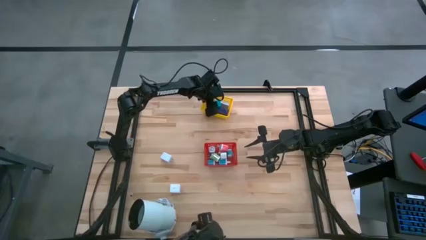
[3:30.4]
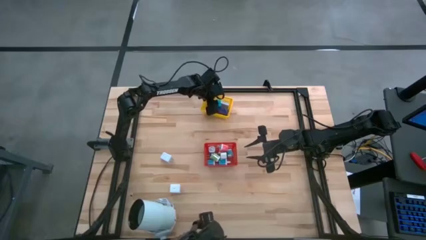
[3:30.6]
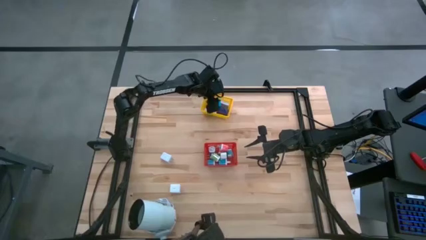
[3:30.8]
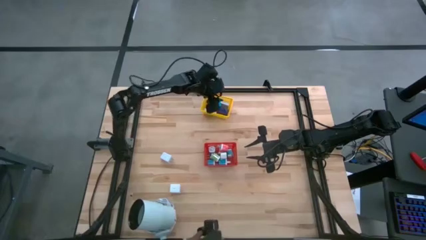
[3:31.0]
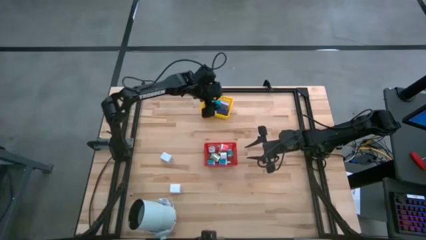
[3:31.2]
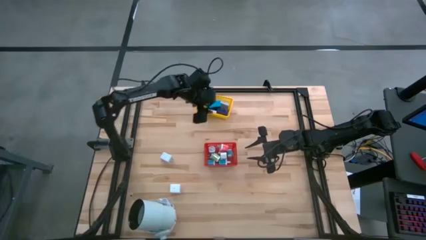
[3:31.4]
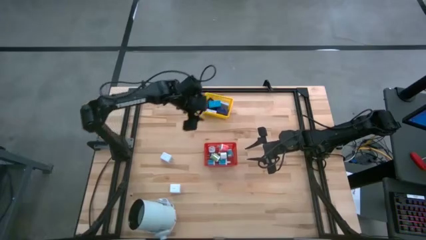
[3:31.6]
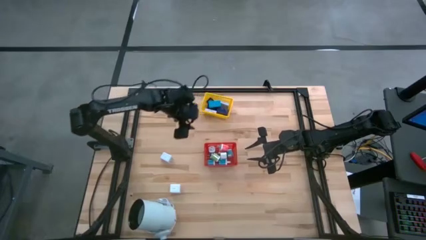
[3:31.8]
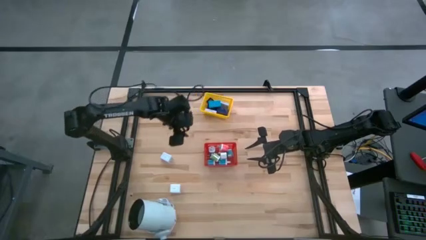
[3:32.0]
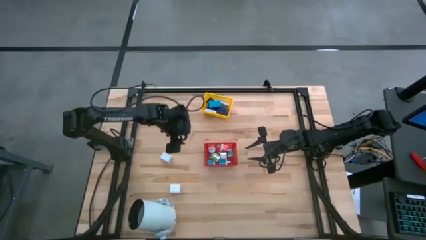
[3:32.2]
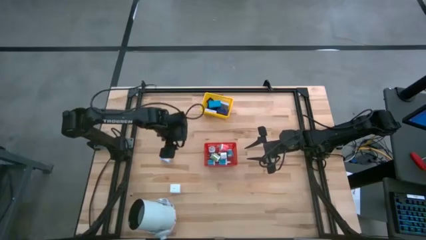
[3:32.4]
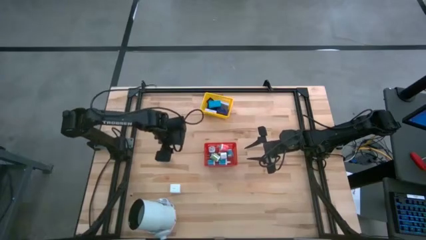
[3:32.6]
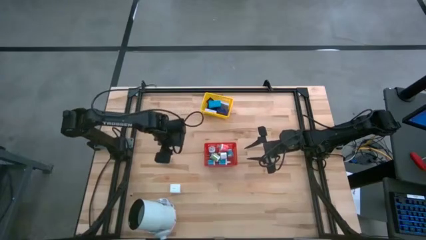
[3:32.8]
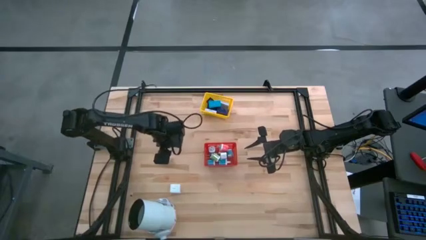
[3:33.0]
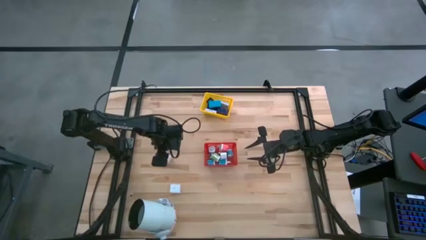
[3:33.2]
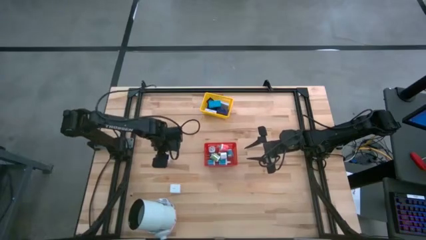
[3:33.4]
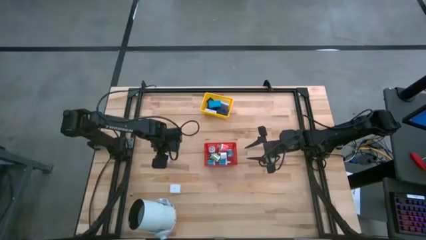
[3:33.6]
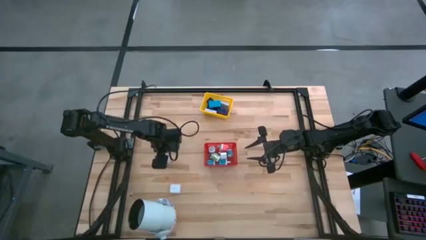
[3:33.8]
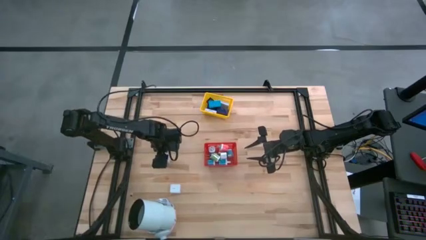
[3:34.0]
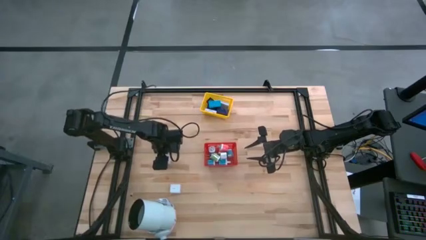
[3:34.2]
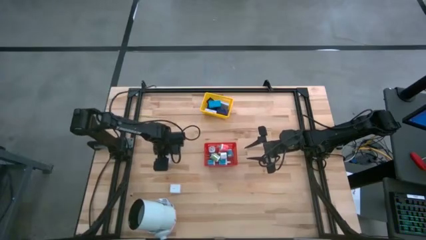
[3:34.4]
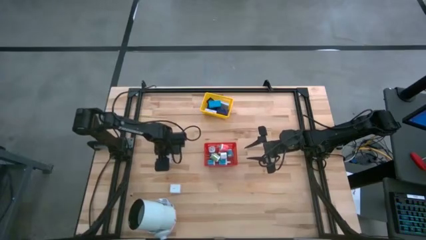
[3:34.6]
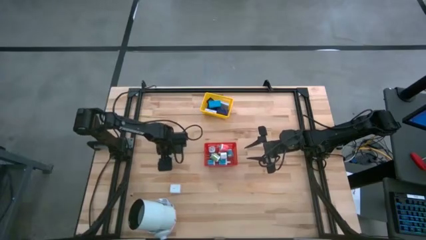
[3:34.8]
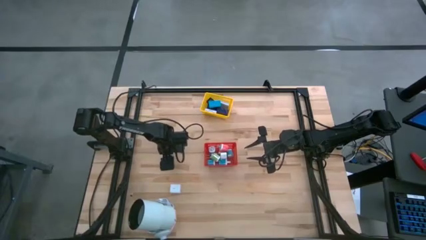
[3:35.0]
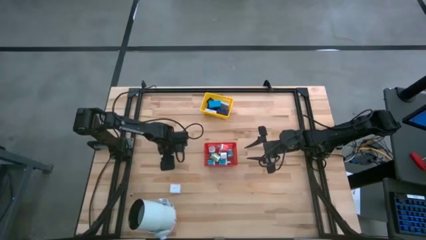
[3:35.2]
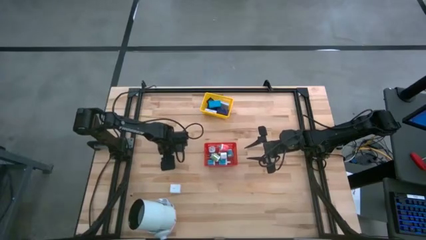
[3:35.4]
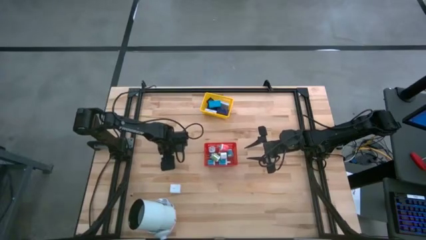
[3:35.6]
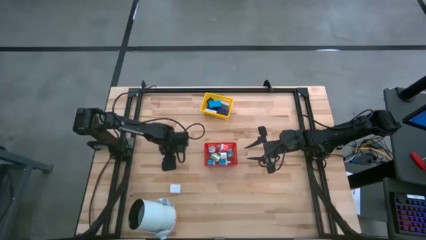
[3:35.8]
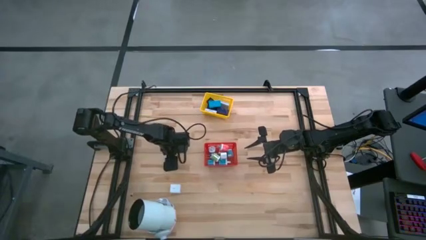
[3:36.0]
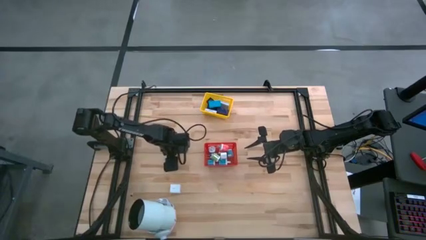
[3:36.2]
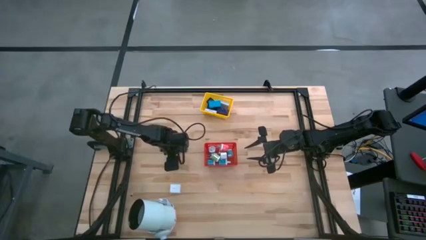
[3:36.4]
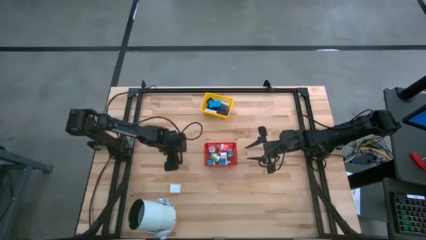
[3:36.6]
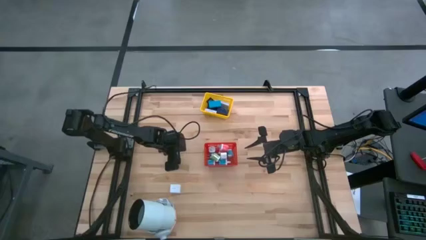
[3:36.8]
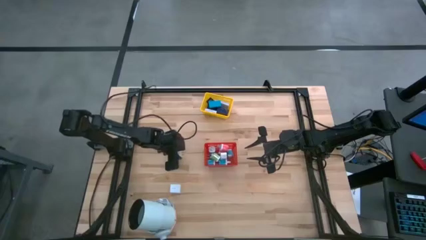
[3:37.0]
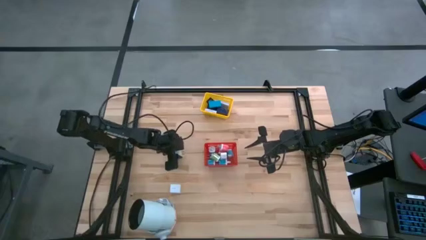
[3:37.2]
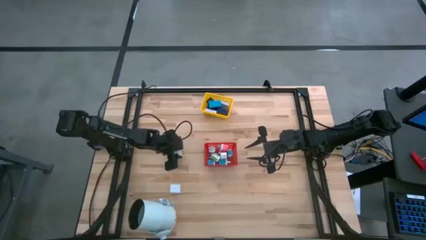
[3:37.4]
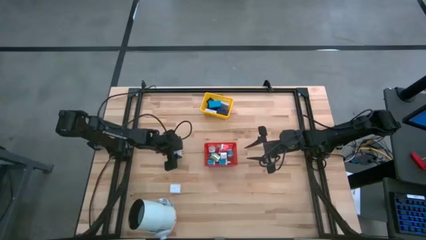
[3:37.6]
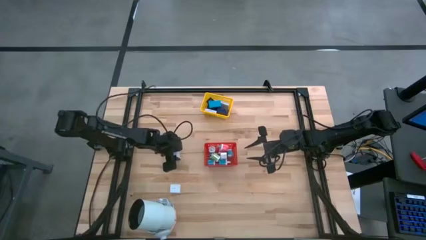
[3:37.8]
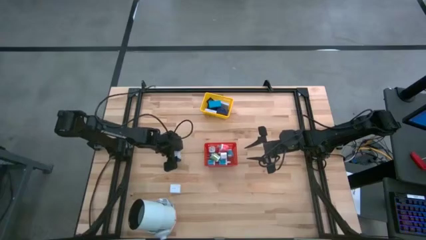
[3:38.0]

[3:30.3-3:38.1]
Task: Pick & Place Office items
Put the top white charger adapter into the red bin

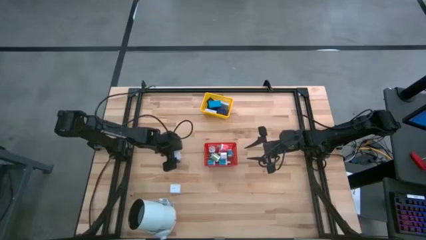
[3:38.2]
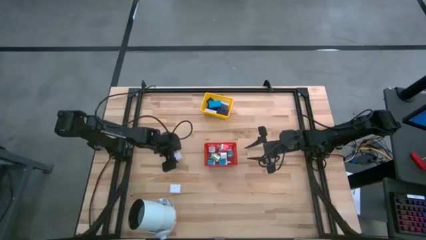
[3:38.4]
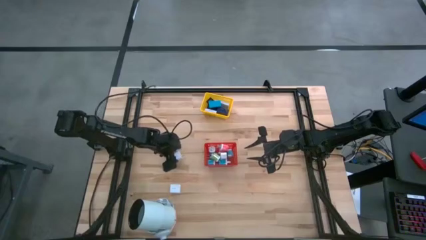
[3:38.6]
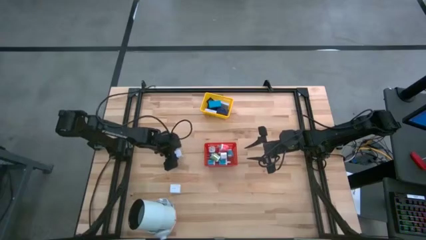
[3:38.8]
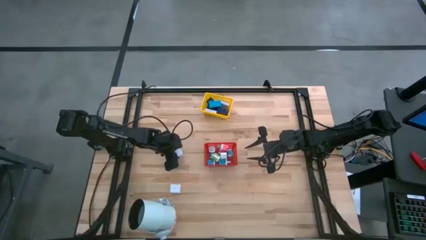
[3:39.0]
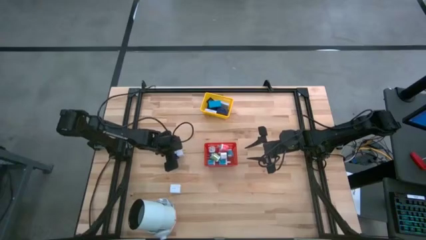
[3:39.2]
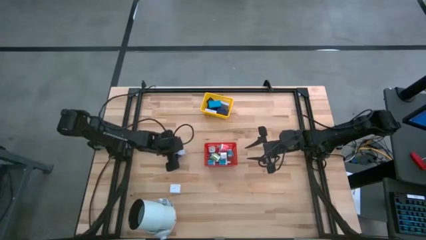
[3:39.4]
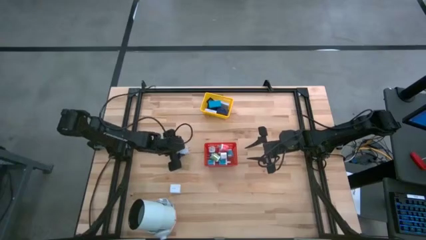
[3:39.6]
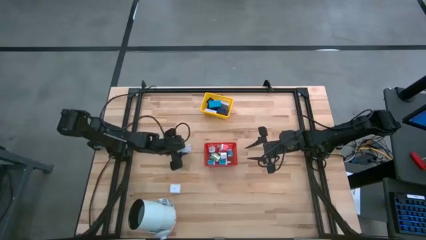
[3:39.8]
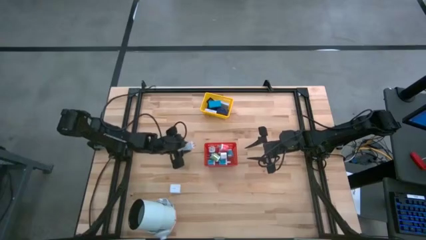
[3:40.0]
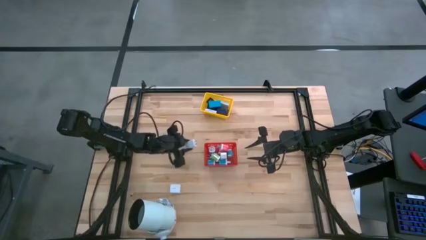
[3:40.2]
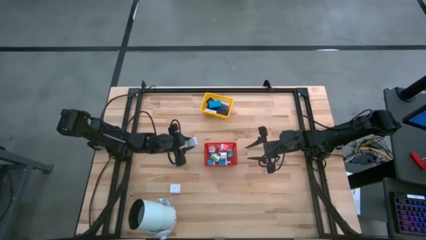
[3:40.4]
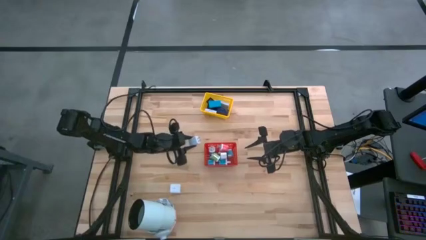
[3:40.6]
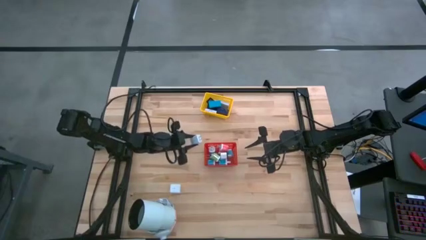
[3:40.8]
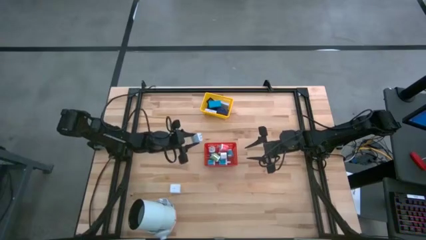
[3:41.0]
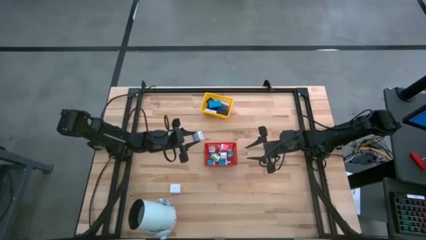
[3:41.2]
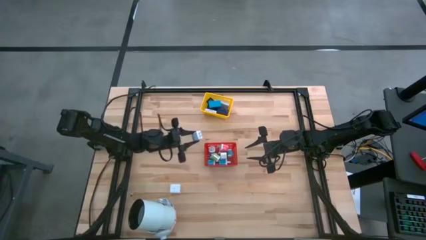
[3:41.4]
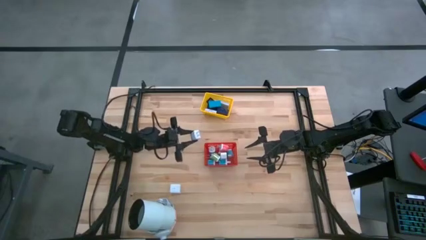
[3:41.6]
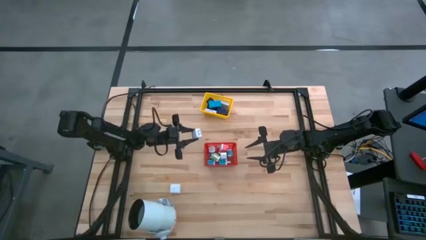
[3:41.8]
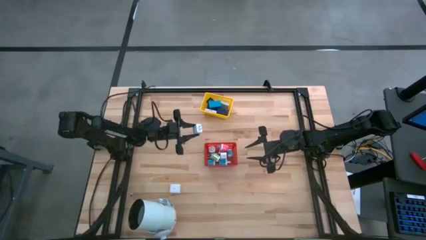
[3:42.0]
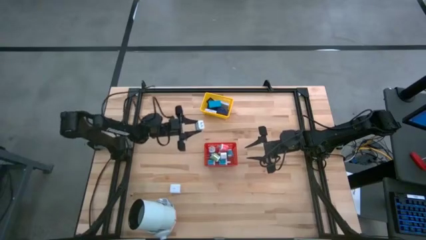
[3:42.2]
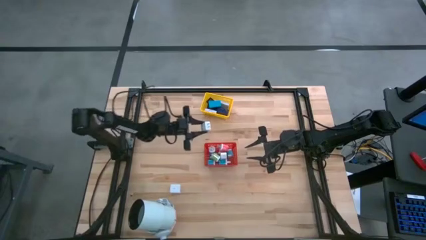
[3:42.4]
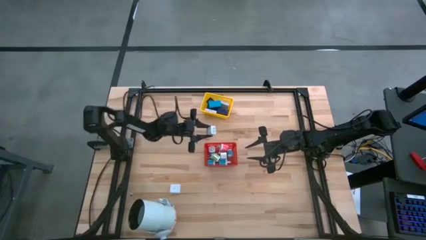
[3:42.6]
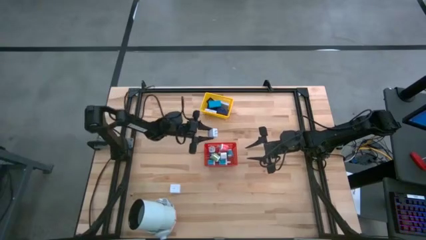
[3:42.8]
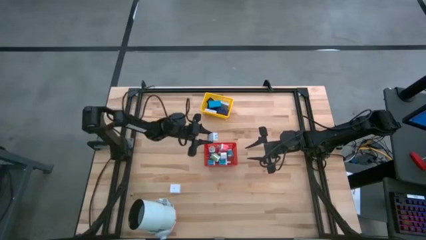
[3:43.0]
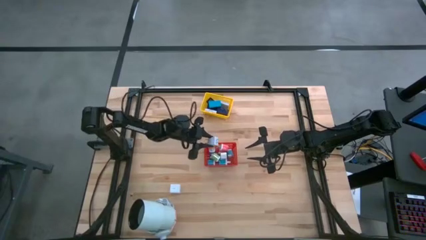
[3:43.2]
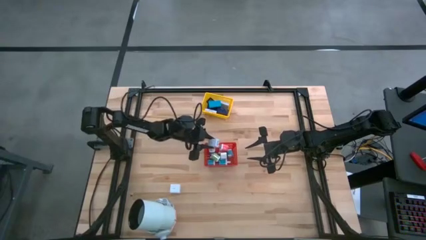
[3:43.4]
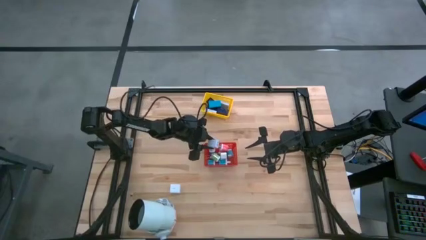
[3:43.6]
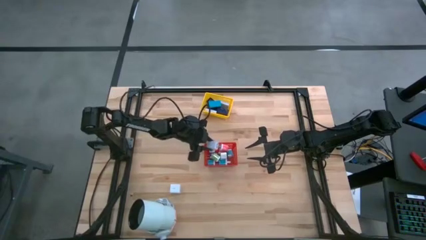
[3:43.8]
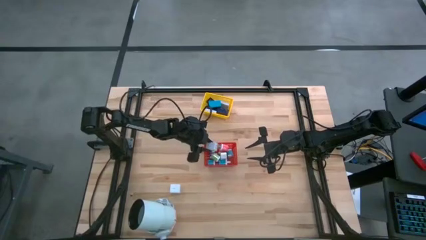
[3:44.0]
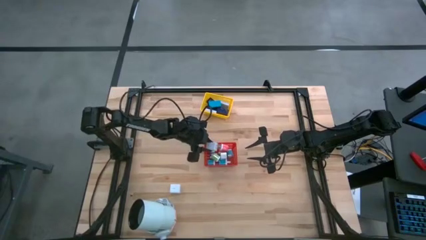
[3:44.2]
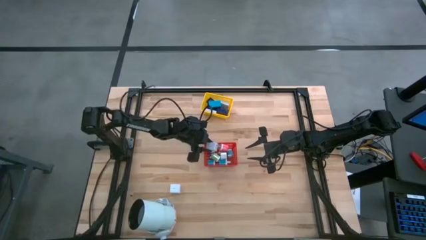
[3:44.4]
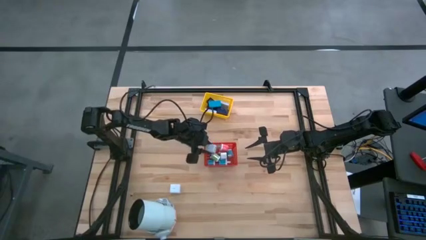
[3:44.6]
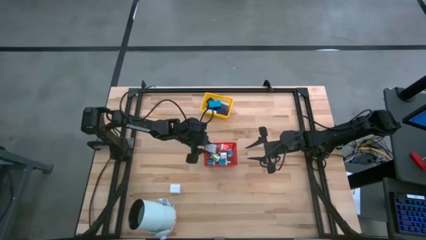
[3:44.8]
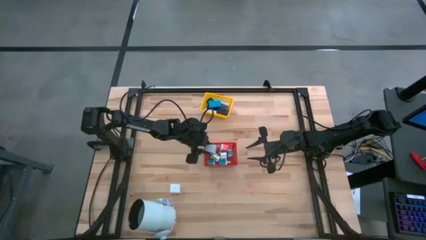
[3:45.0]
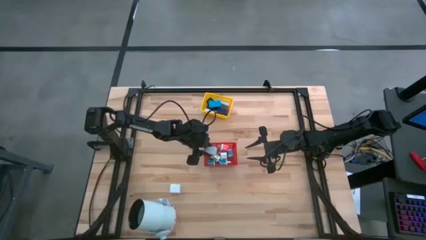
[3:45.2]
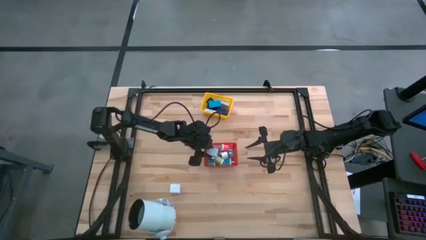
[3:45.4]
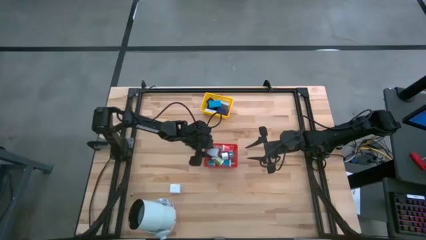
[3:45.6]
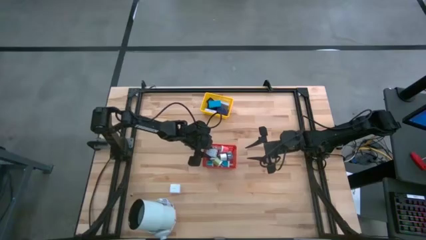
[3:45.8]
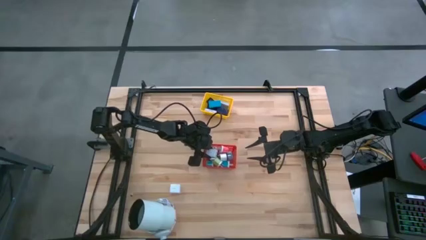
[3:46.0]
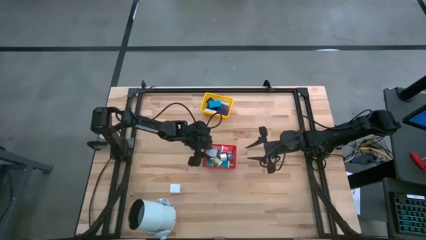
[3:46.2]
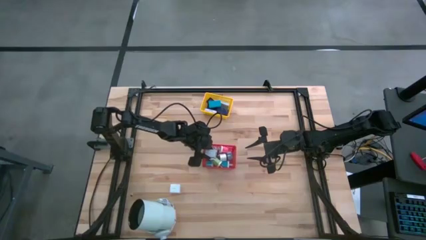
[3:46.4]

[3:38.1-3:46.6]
Put the top white charger adapter into the red bin
